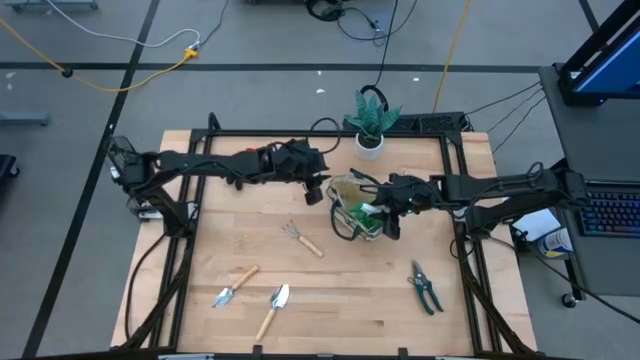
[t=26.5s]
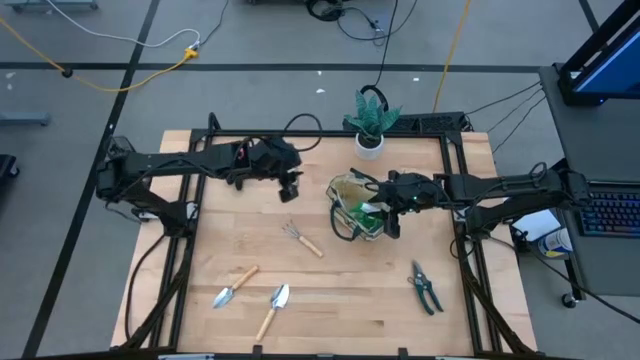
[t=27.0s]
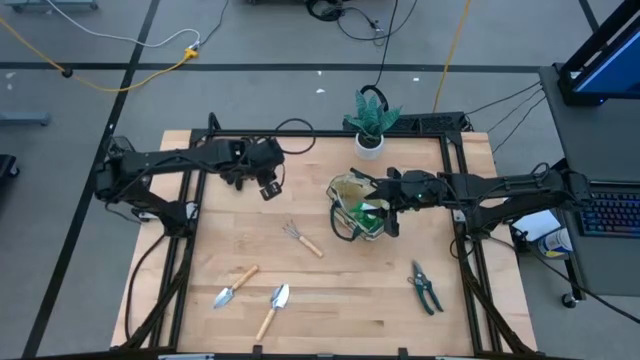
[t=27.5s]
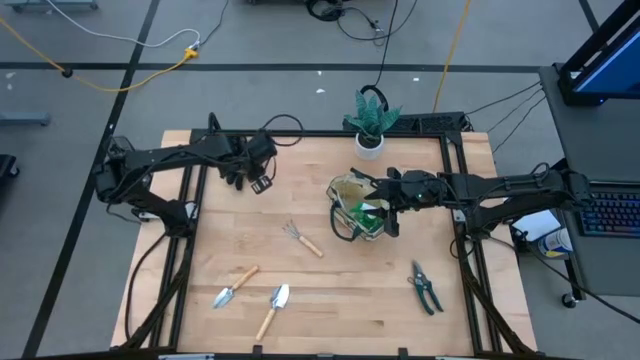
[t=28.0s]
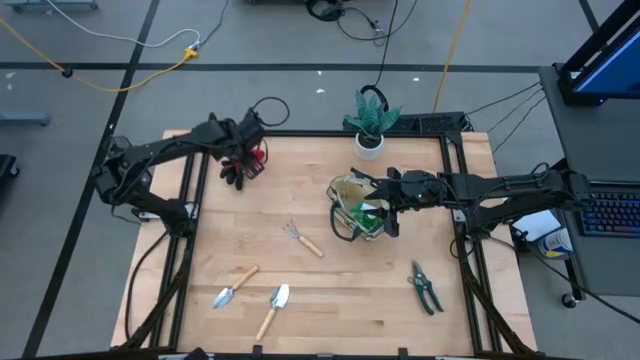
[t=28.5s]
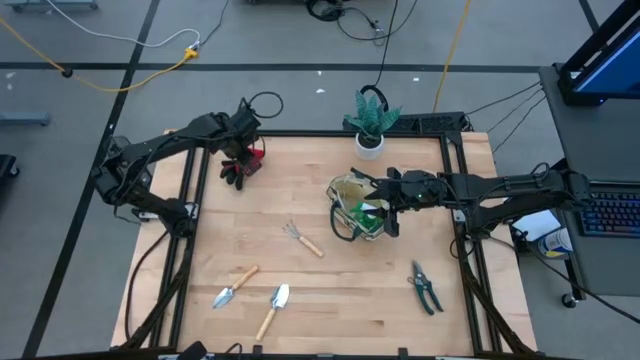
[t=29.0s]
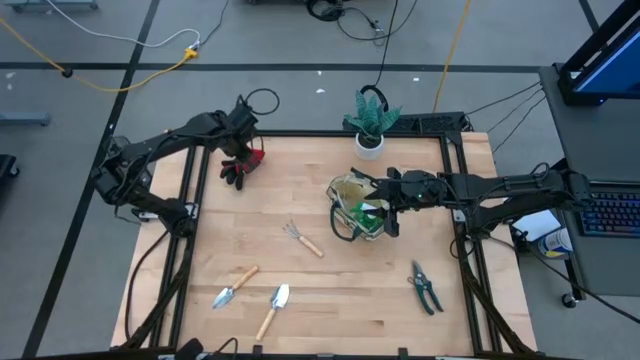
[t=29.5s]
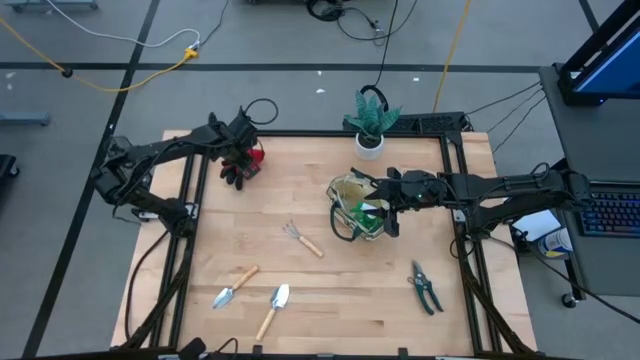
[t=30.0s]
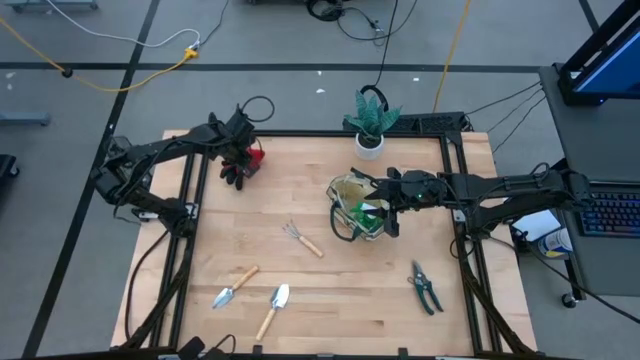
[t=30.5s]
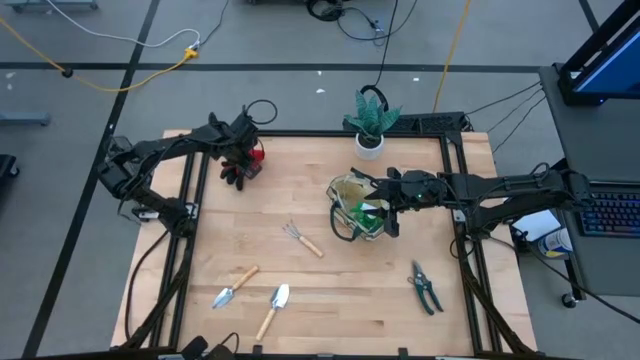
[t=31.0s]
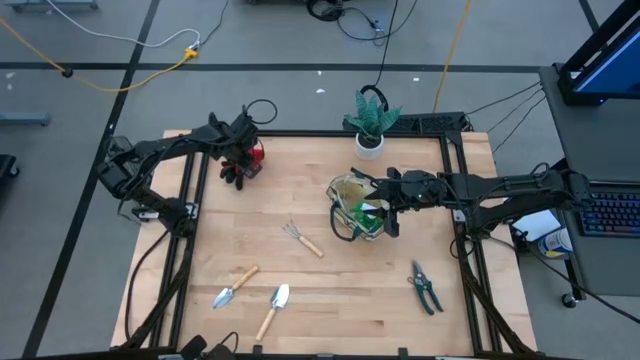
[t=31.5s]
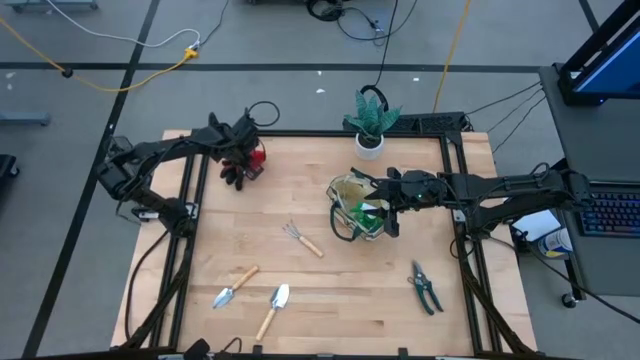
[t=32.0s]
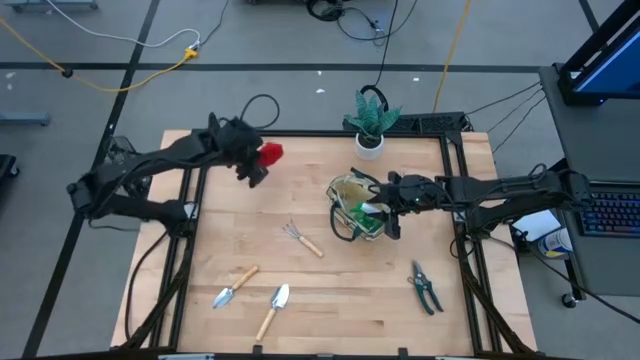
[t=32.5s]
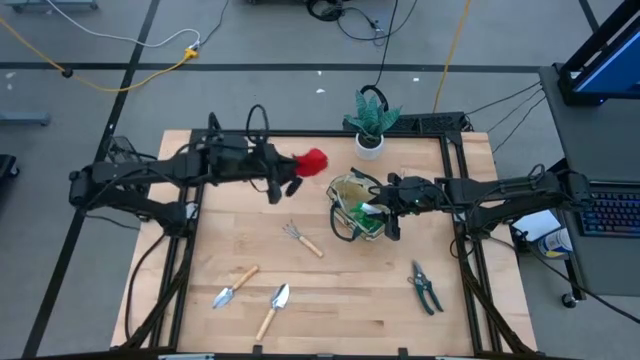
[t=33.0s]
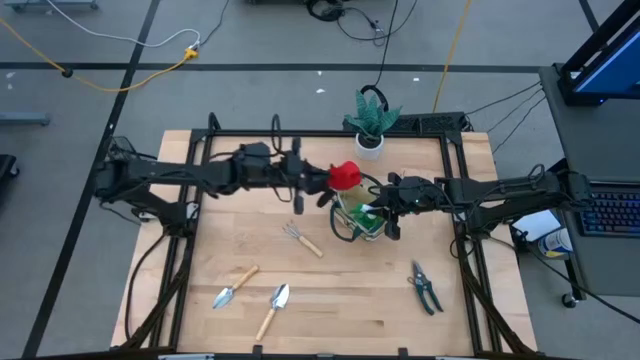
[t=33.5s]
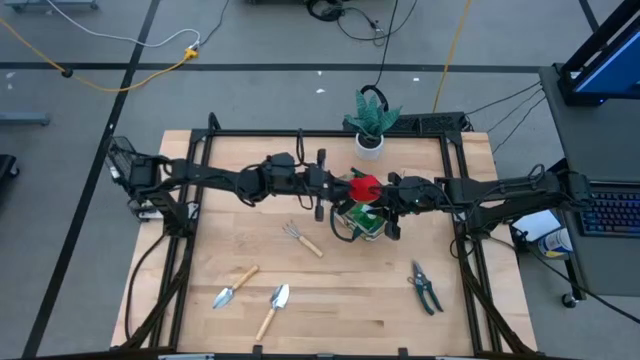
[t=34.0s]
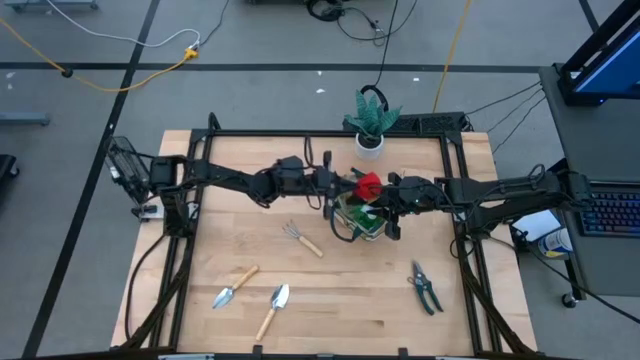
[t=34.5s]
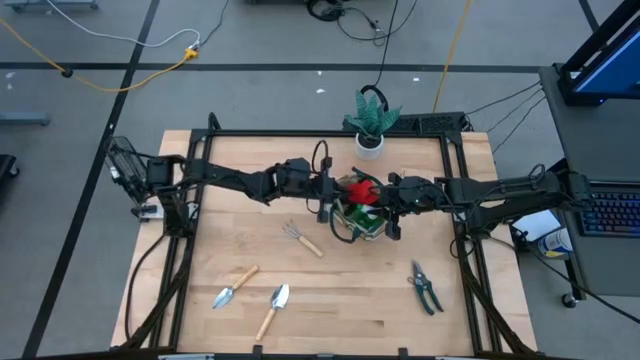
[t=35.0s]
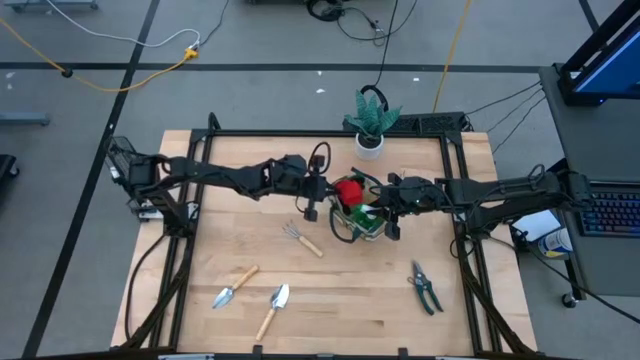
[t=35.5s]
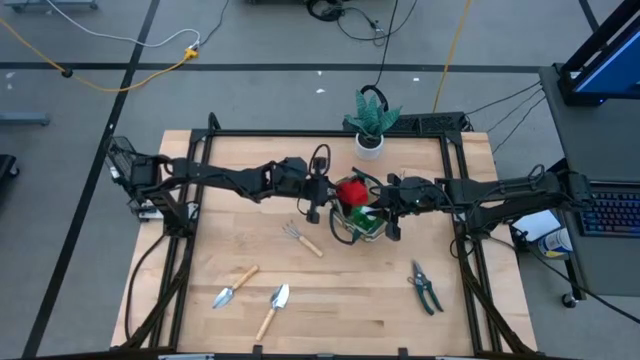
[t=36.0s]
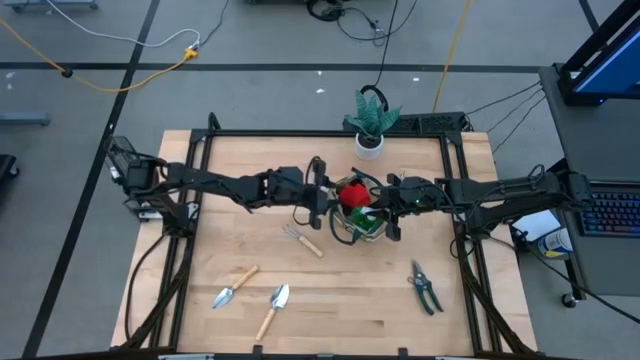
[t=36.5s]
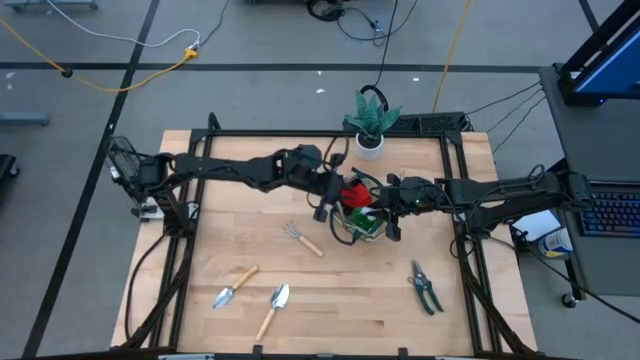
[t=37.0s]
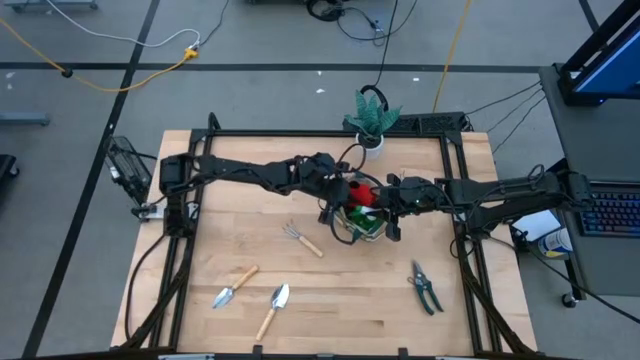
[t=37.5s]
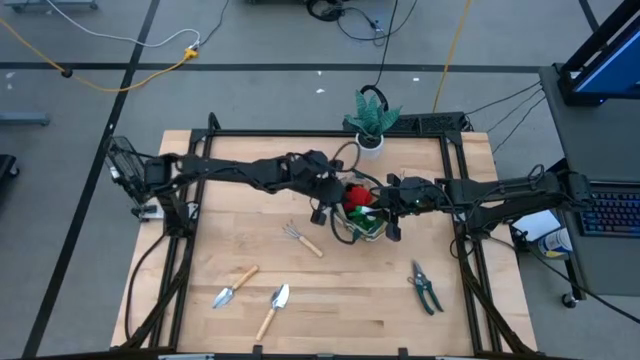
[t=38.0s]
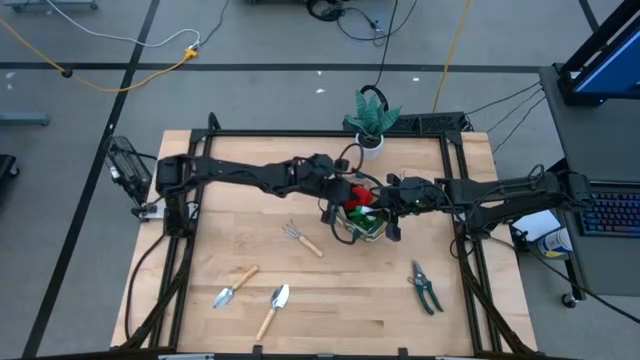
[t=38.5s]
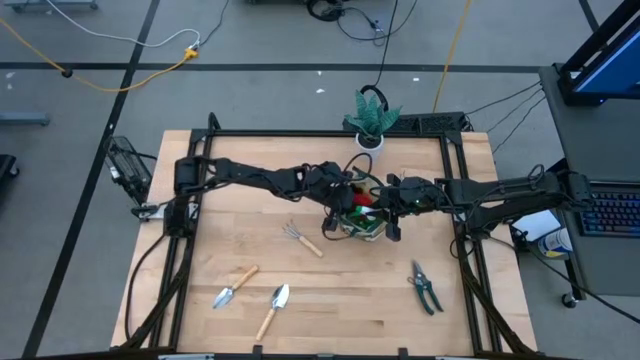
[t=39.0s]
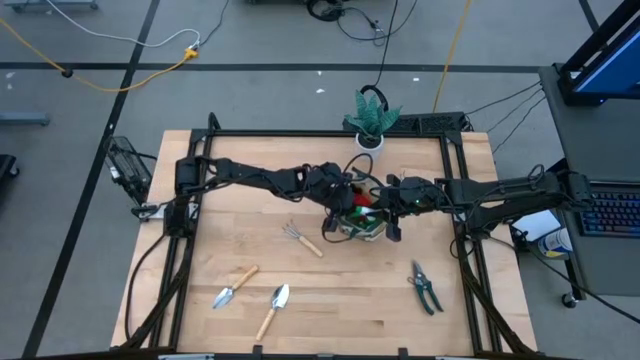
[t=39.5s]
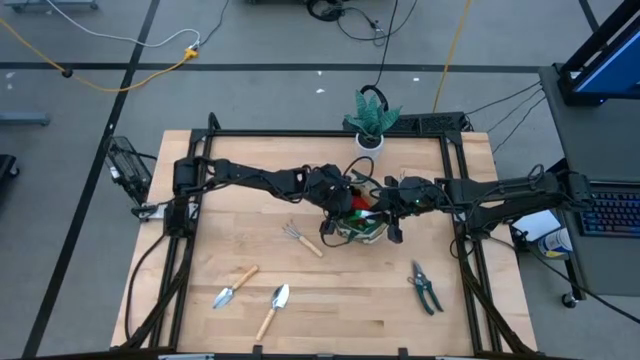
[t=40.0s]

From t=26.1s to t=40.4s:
Task: Pick & Place Garden tools in Gardening bag
Put the red gloves into the gardening bag

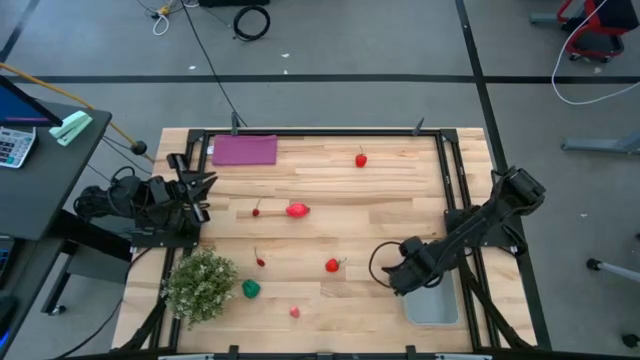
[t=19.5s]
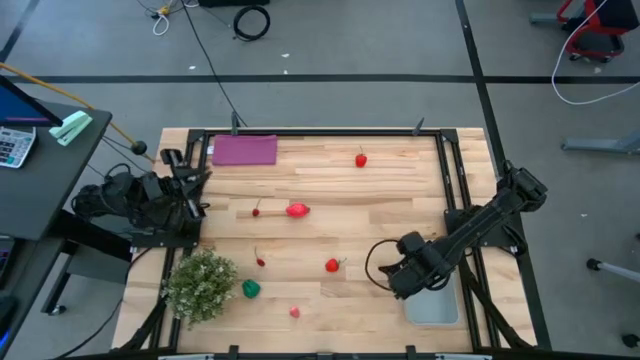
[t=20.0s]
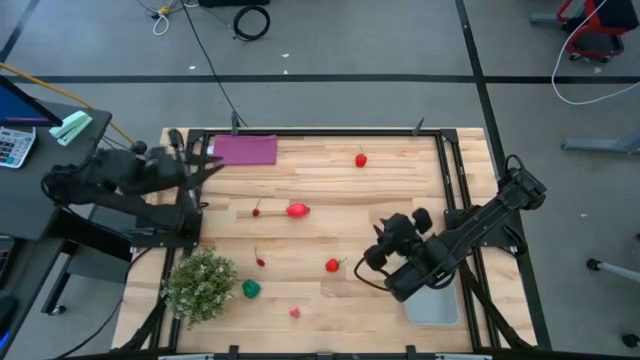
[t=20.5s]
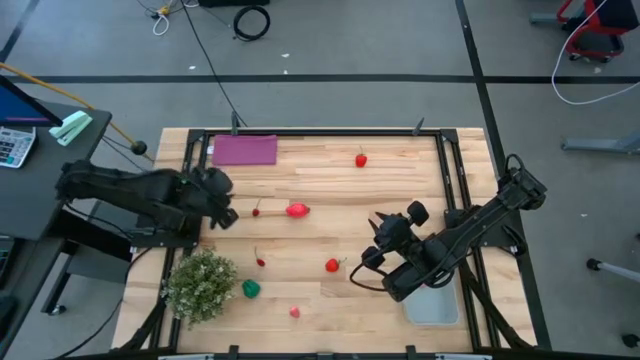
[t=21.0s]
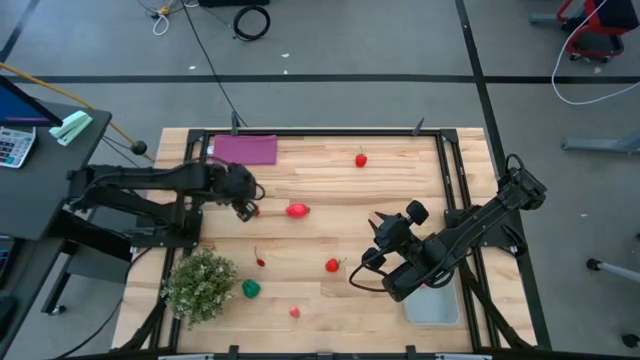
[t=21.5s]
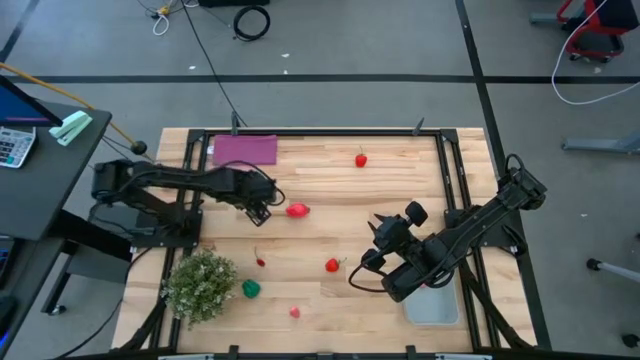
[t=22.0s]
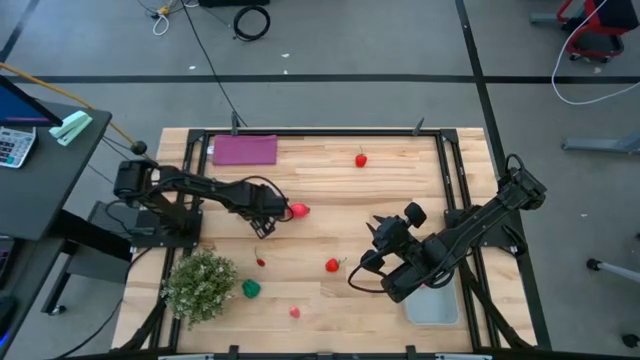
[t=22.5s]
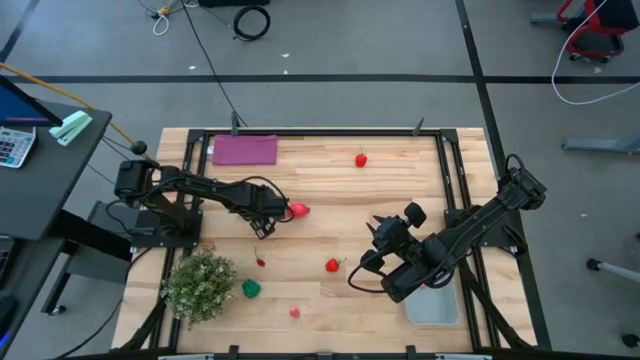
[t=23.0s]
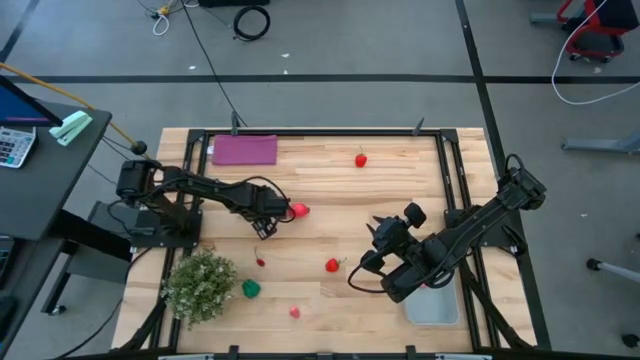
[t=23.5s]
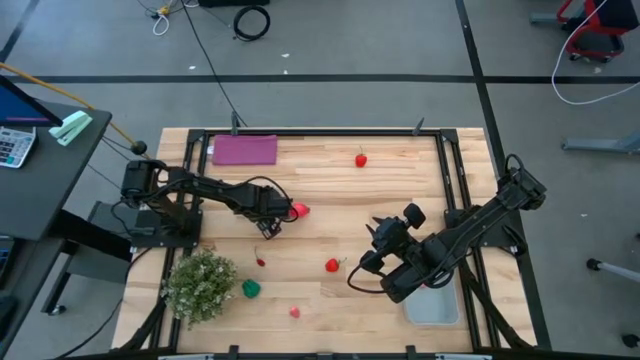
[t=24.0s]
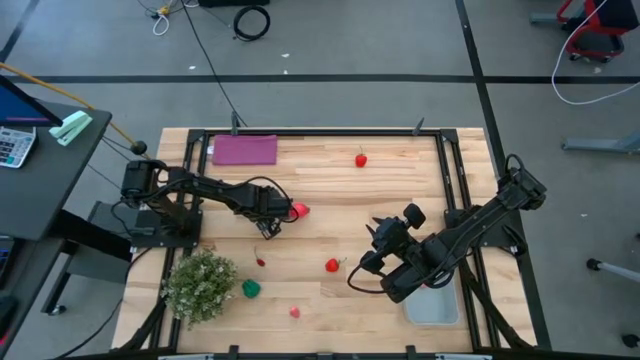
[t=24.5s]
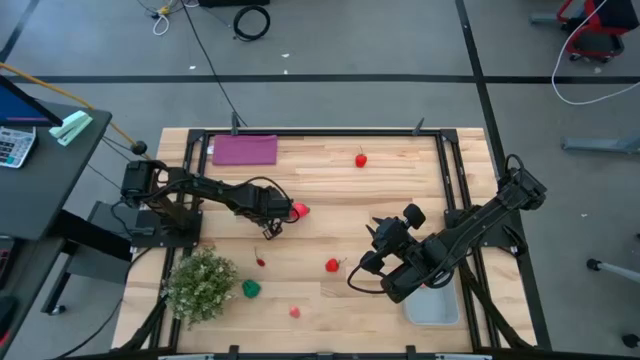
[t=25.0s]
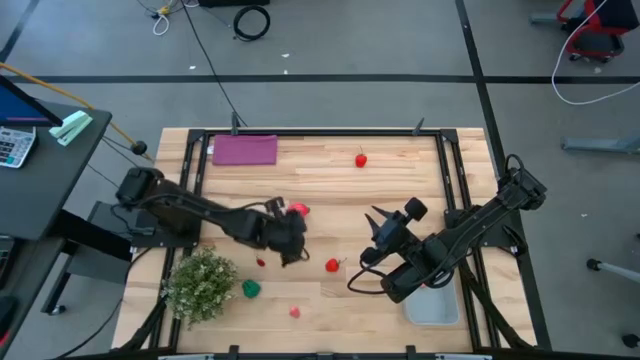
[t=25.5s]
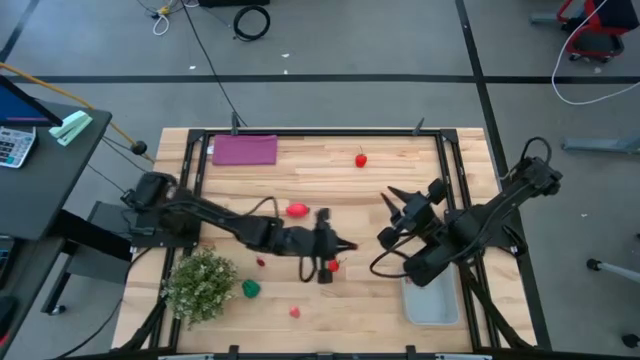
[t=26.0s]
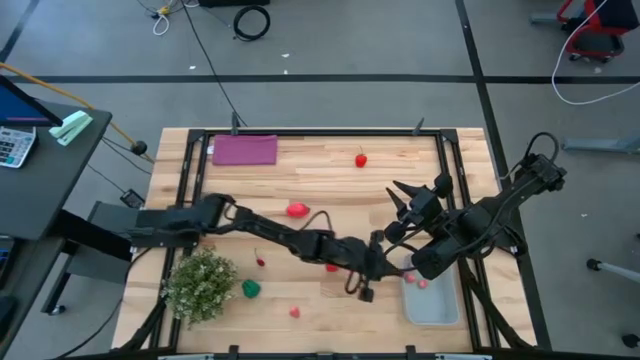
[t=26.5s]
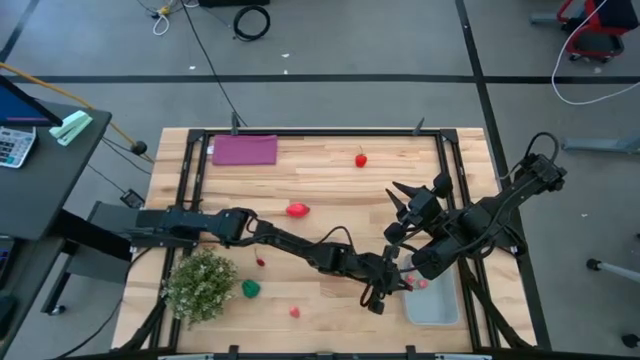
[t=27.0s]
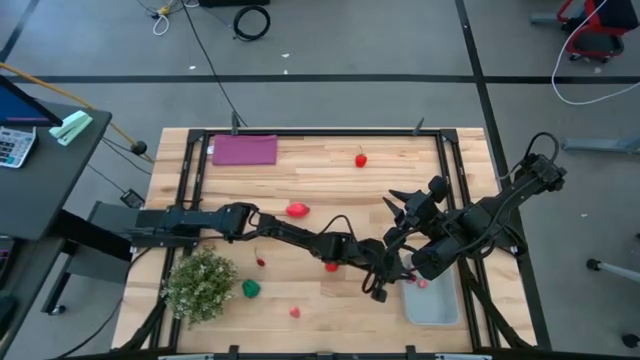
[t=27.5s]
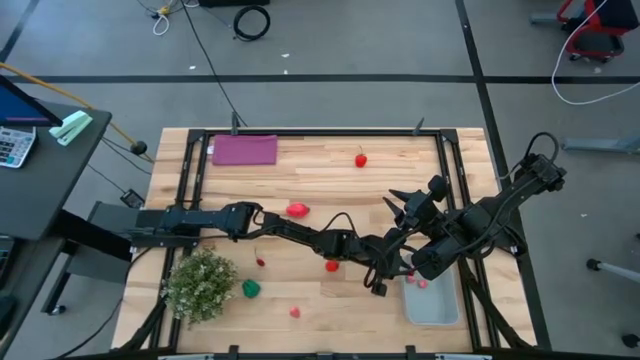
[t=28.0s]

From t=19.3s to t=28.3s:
Task: Pick and placing Produce into tupperware
Put the red cherry into the gray bin
